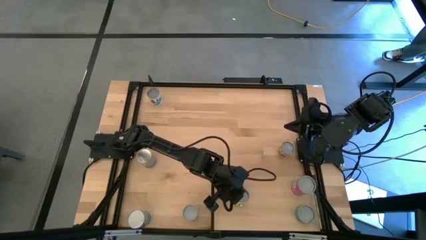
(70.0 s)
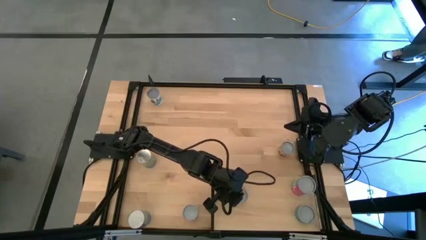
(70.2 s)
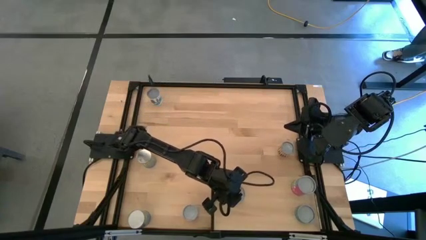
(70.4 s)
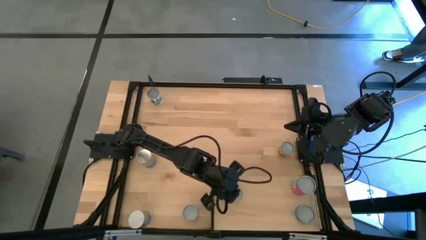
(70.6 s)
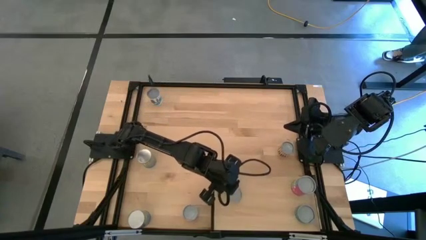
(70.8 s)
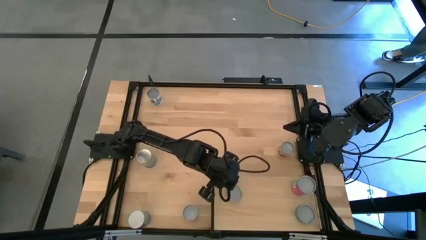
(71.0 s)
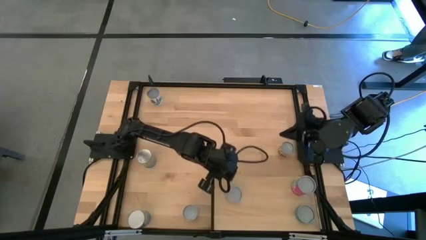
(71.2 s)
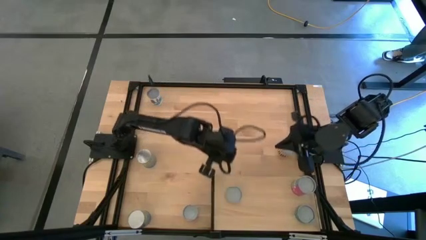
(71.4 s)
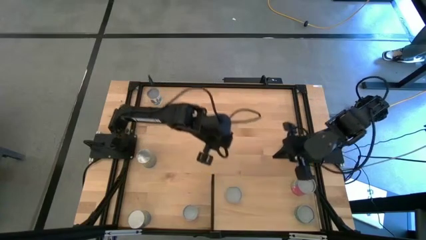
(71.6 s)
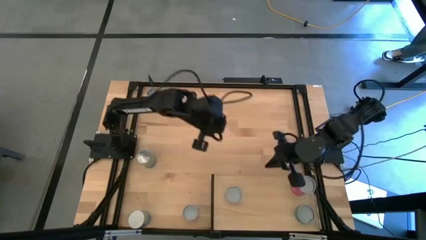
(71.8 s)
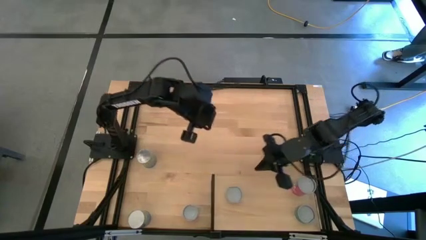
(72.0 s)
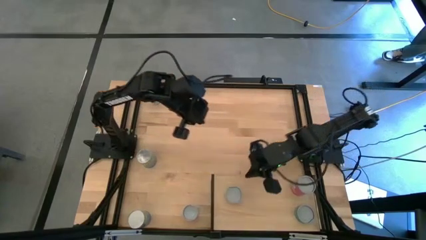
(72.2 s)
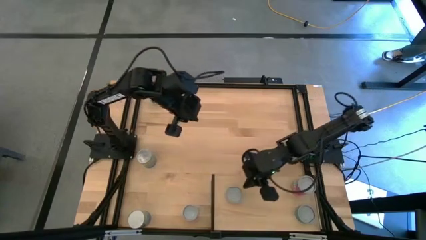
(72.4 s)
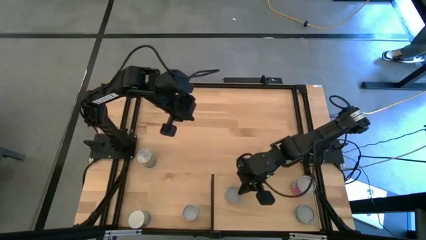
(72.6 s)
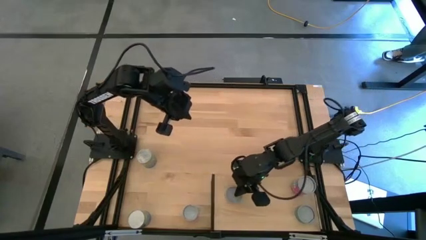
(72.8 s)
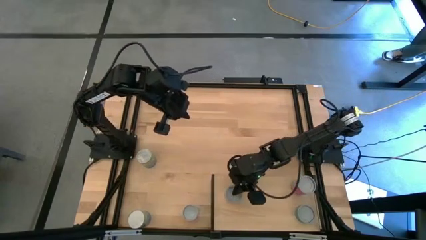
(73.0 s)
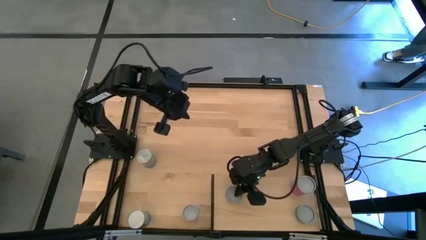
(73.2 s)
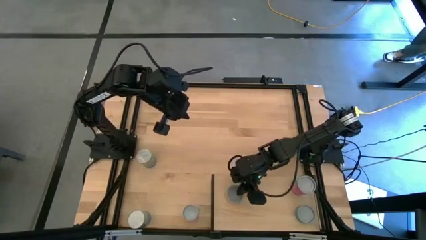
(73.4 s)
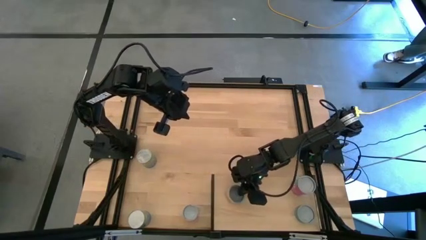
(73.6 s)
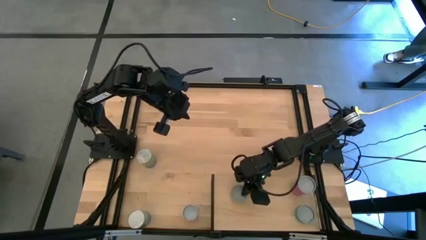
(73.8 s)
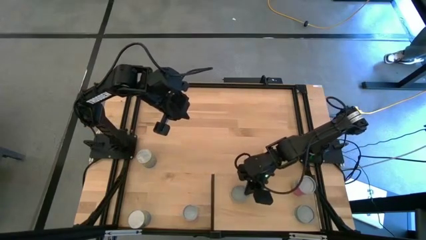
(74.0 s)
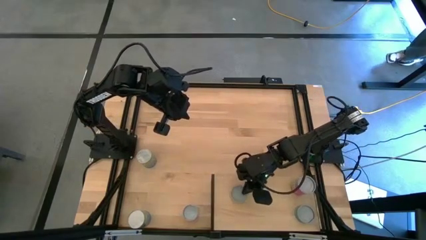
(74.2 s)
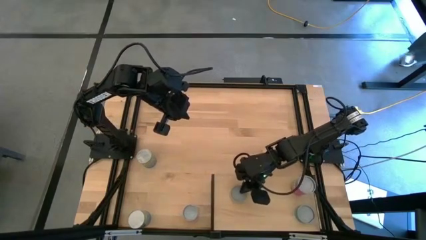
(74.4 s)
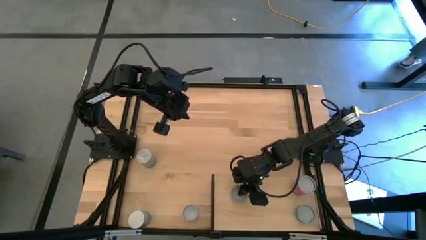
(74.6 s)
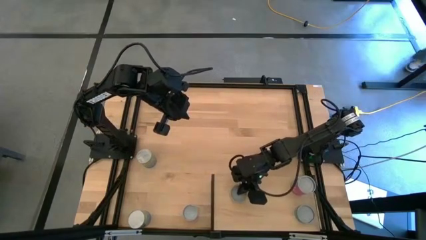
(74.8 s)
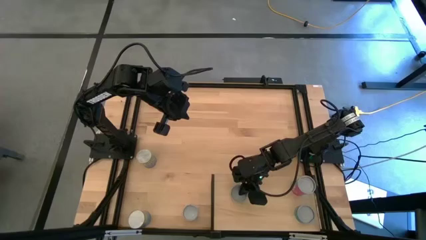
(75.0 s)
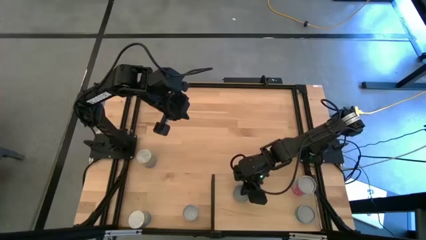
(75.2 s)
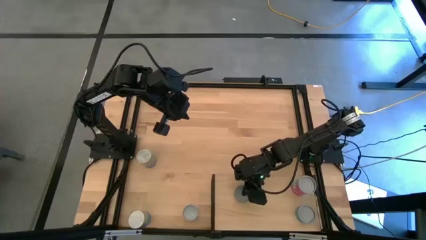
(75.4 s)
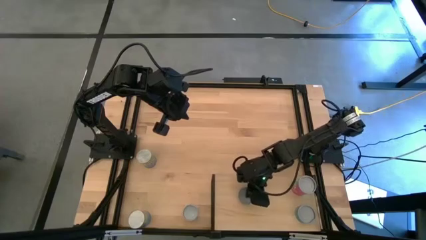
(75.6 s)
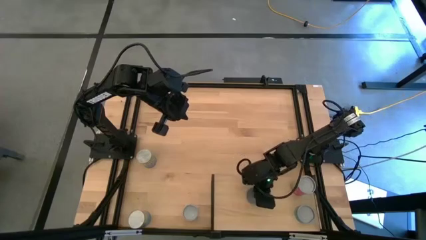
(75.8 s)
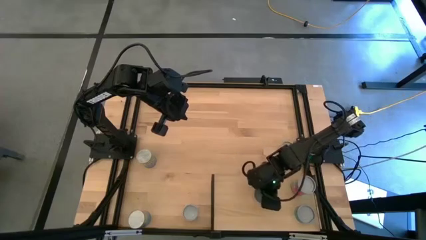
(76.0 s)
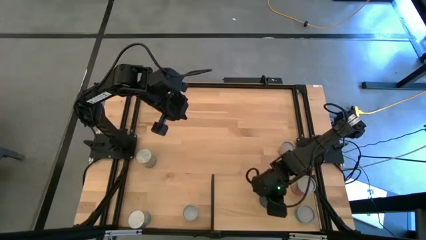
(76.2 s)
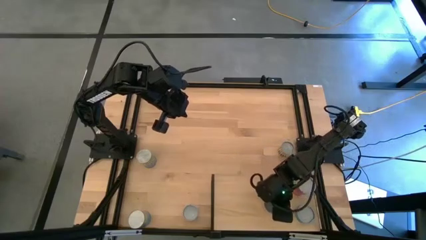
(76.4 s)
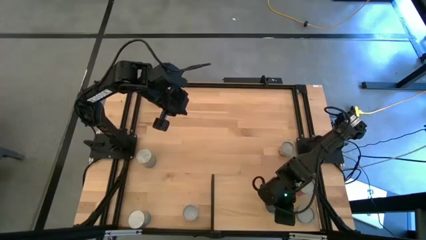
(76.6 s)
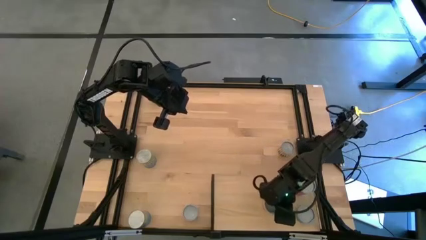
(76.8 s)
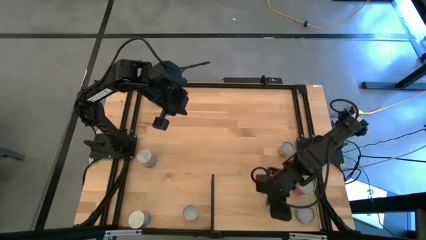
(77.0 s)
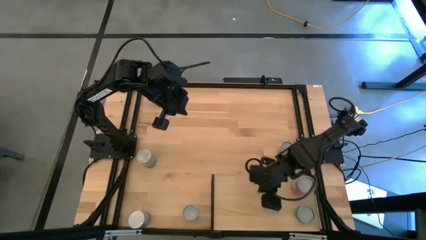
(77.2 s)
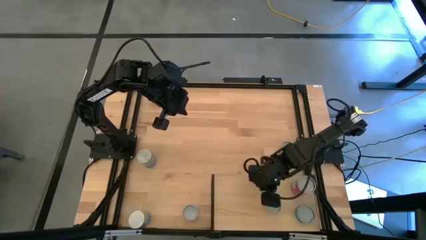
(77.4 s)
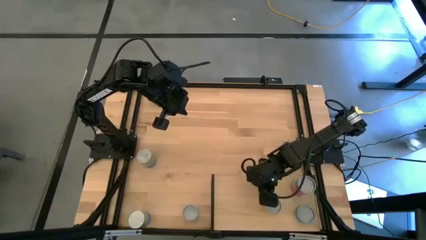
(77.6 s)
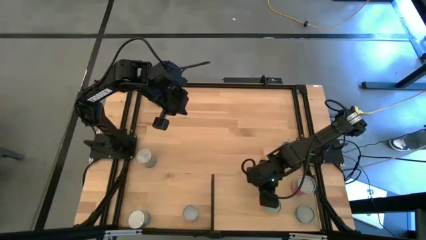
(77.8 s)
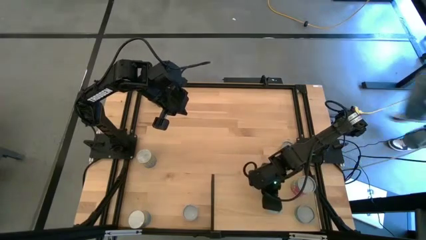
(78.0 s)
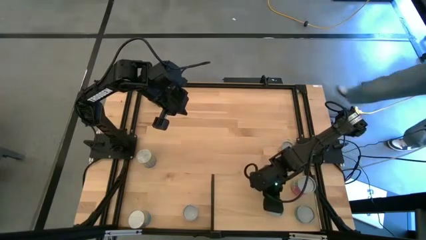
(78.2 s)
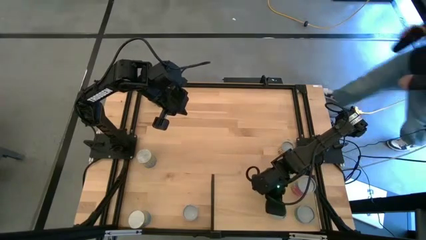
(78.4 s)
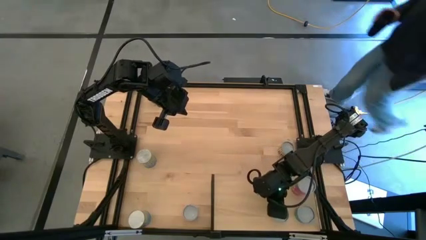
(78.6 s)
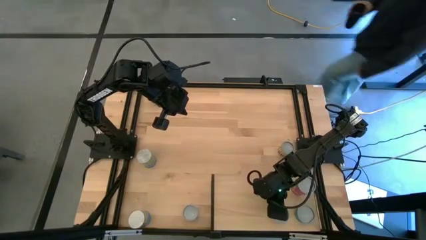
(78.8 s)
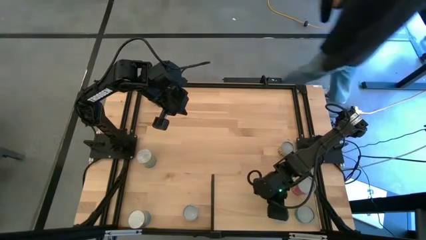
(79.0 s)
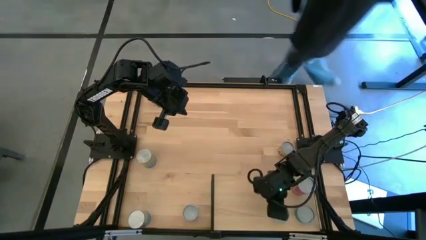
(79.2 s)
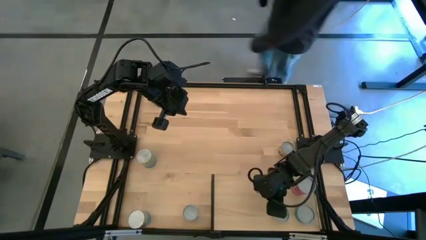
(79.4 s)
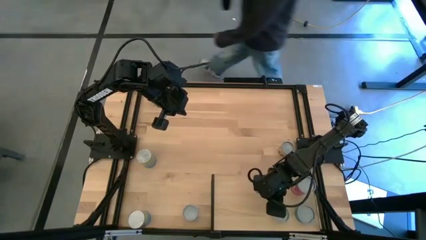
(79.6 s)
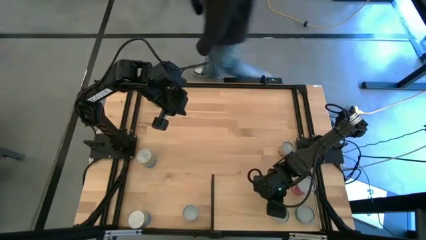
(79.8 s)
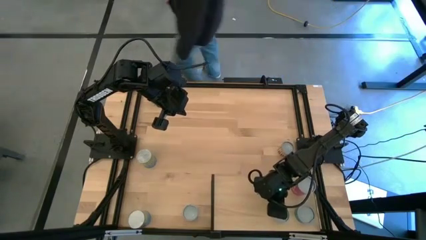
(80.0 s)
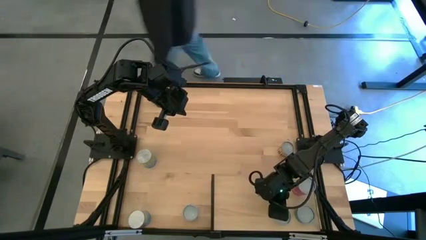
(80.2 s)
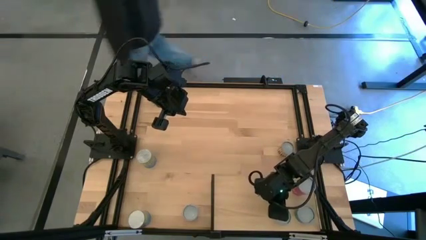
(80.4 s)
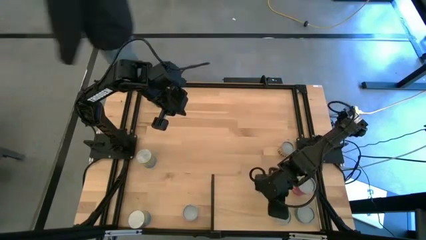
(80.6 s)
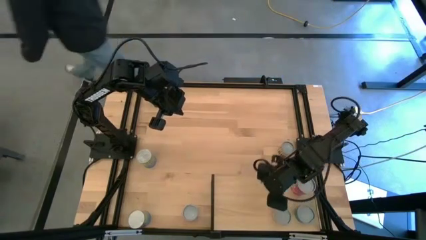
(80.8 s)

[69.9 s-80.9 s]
Task: Pick and place cans onto a shelf
Put the canned mushroom on the shelf
